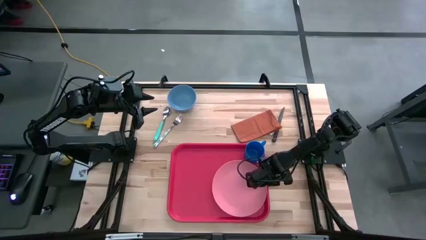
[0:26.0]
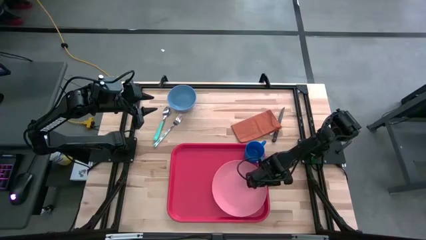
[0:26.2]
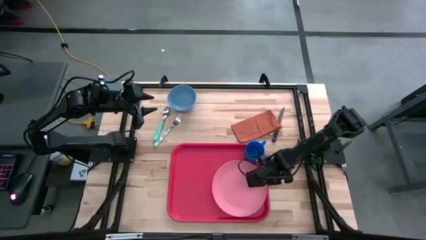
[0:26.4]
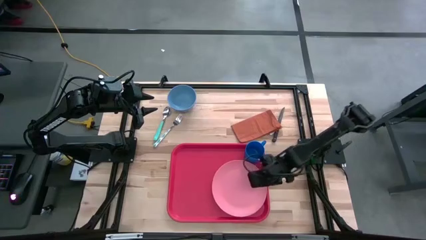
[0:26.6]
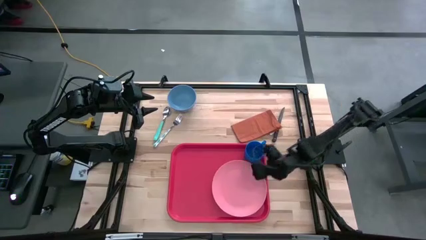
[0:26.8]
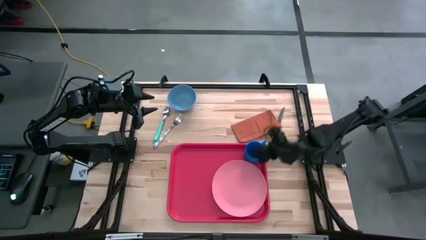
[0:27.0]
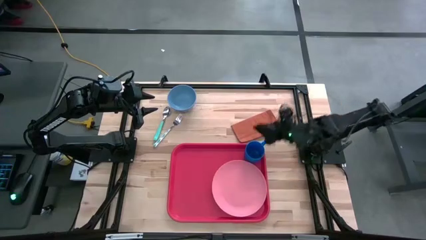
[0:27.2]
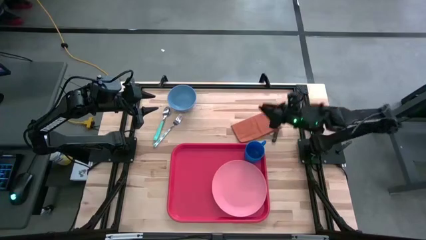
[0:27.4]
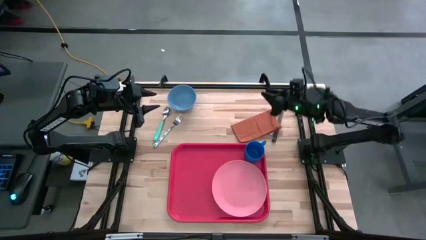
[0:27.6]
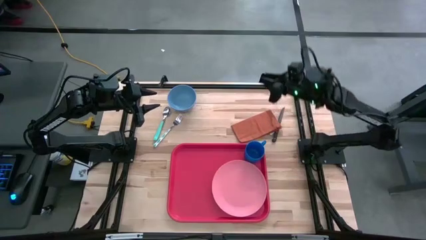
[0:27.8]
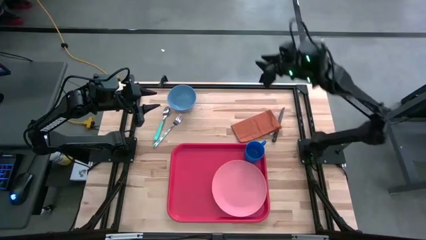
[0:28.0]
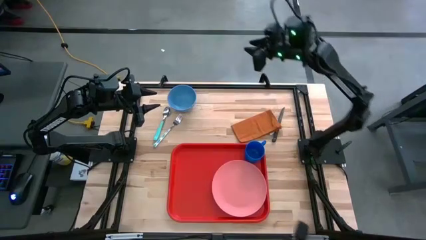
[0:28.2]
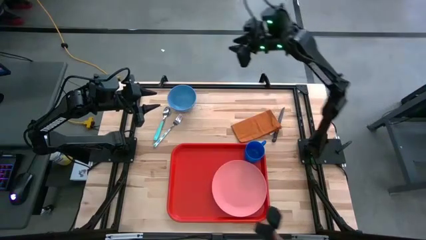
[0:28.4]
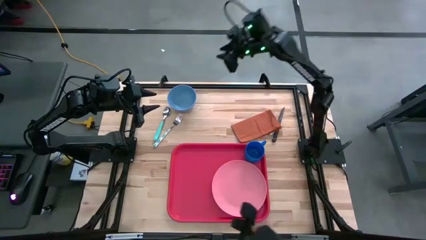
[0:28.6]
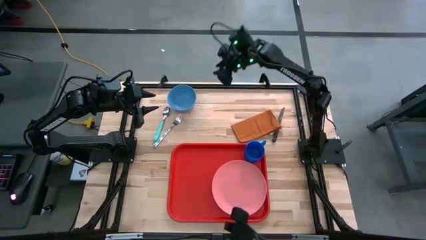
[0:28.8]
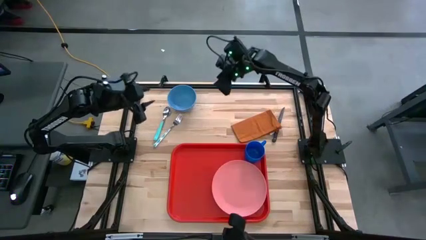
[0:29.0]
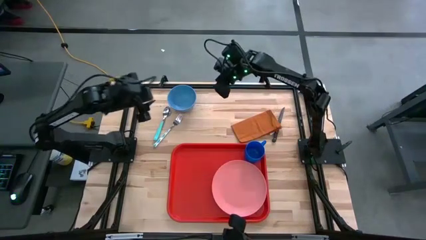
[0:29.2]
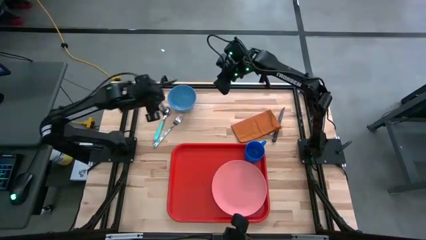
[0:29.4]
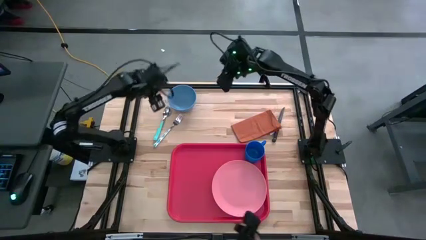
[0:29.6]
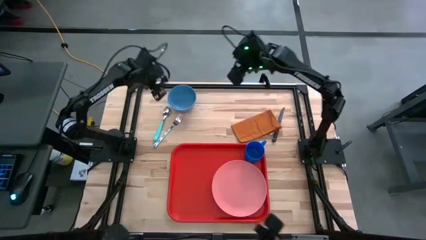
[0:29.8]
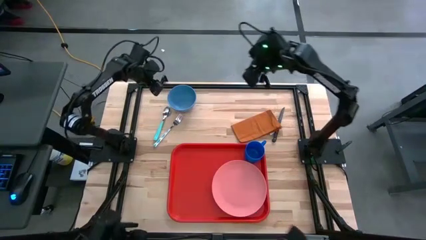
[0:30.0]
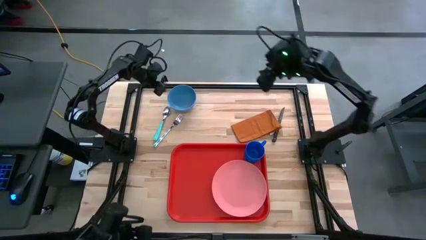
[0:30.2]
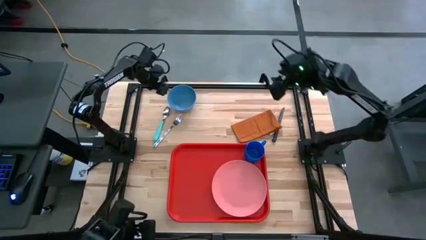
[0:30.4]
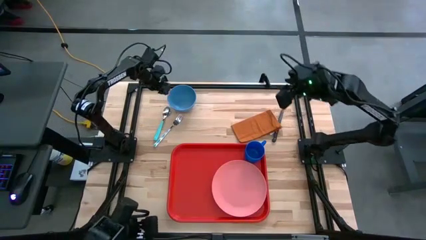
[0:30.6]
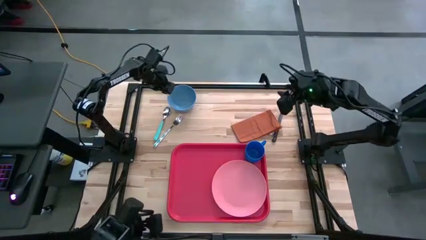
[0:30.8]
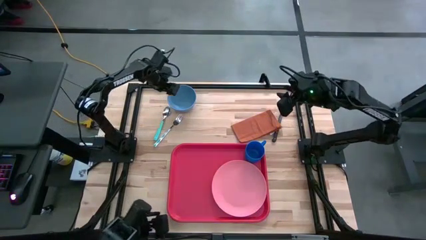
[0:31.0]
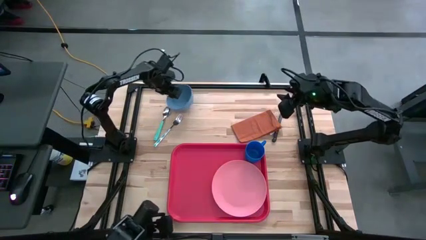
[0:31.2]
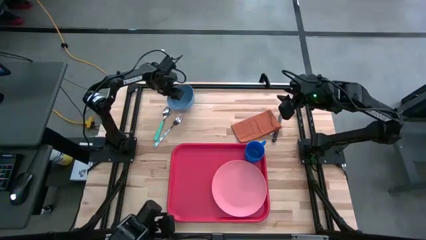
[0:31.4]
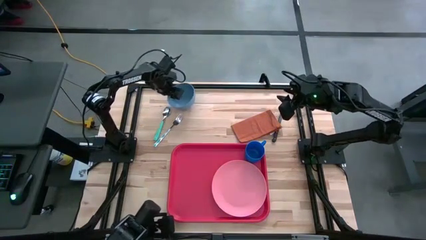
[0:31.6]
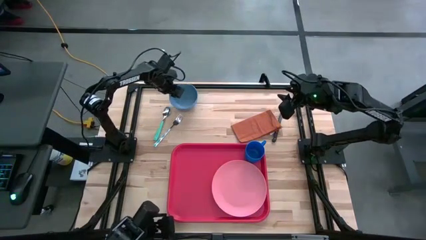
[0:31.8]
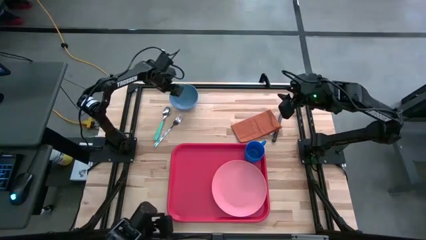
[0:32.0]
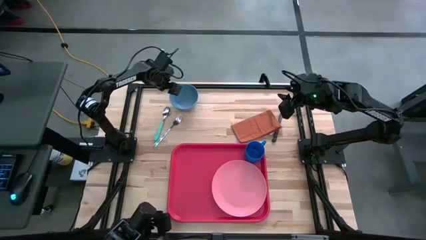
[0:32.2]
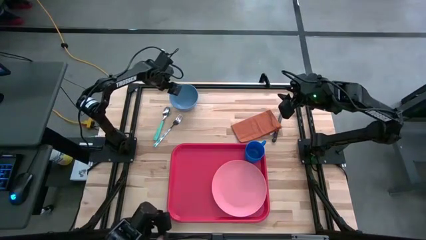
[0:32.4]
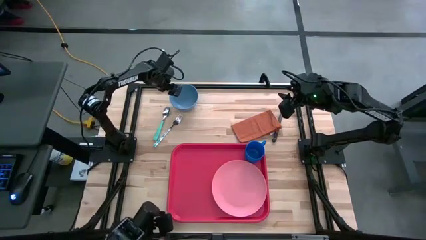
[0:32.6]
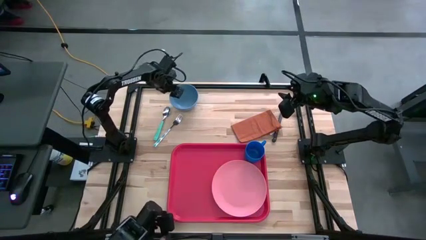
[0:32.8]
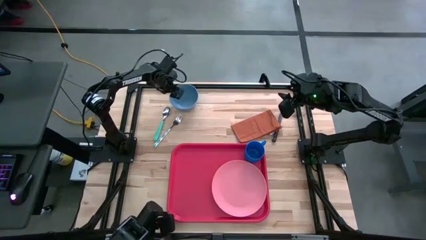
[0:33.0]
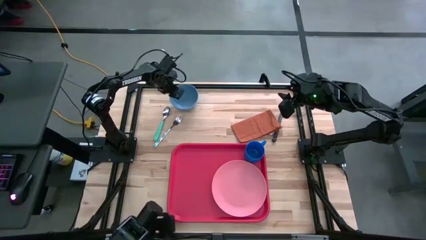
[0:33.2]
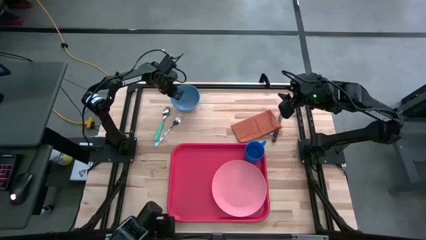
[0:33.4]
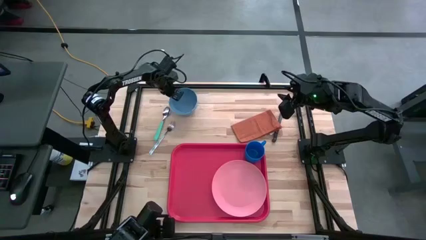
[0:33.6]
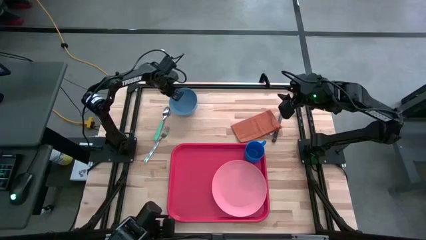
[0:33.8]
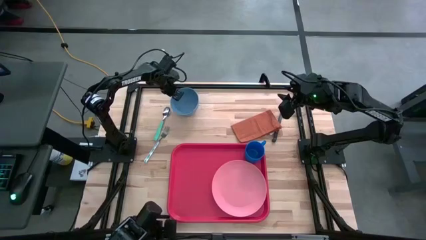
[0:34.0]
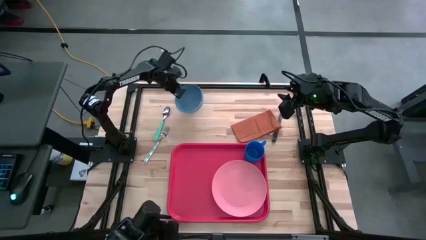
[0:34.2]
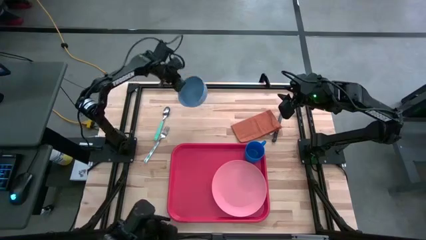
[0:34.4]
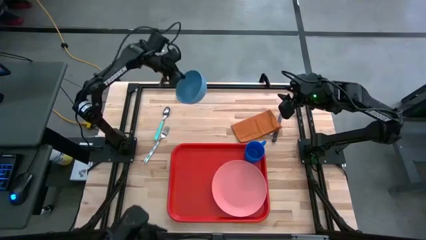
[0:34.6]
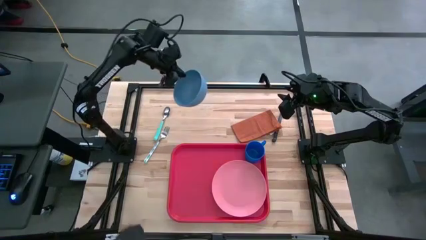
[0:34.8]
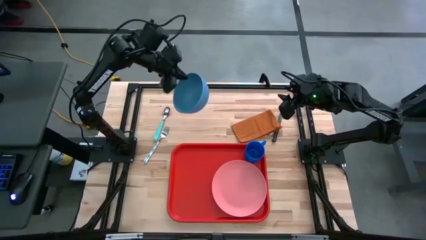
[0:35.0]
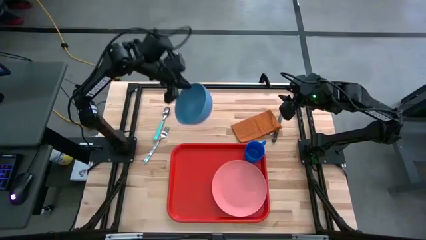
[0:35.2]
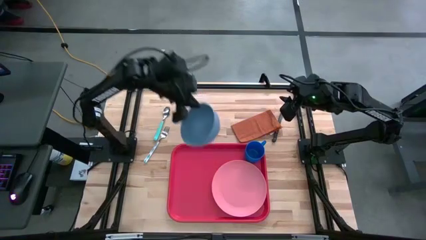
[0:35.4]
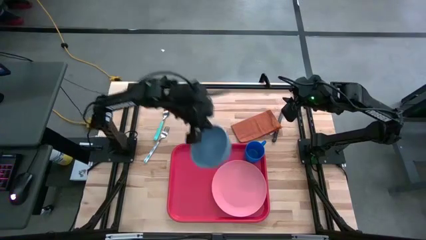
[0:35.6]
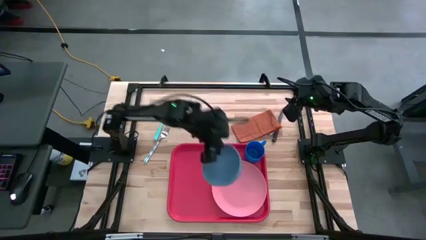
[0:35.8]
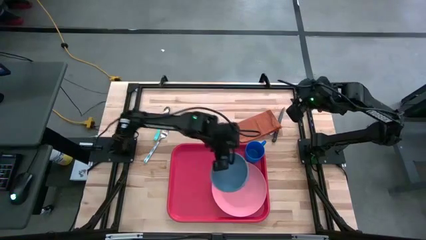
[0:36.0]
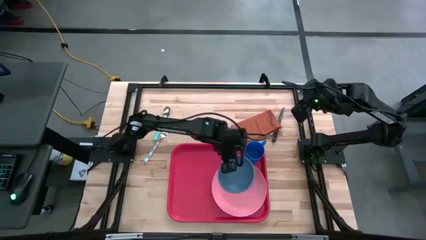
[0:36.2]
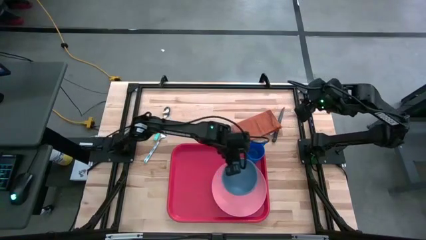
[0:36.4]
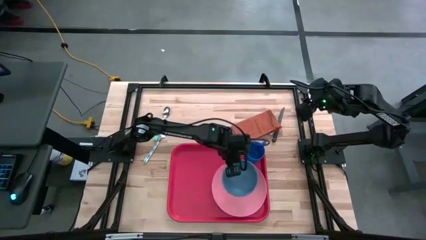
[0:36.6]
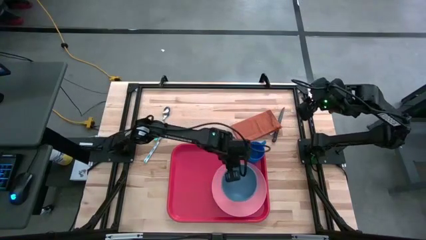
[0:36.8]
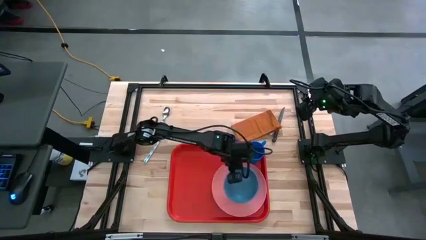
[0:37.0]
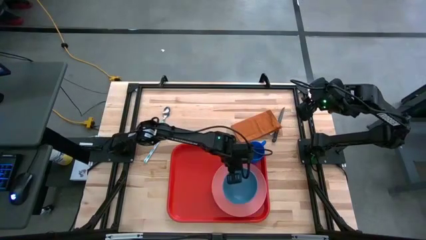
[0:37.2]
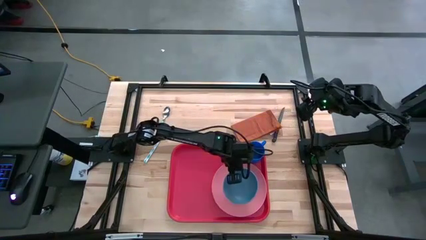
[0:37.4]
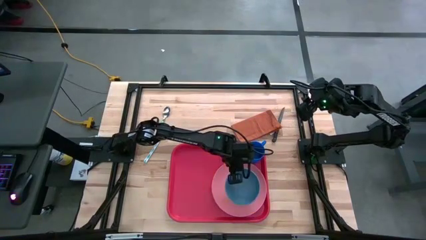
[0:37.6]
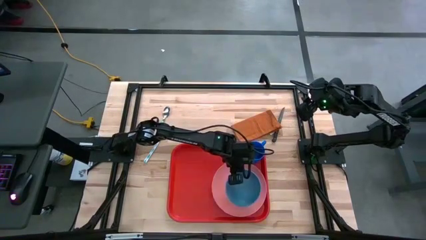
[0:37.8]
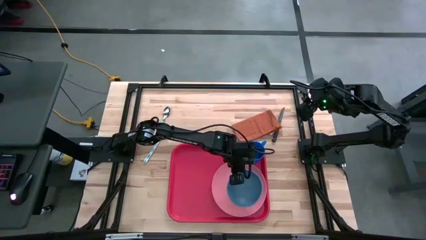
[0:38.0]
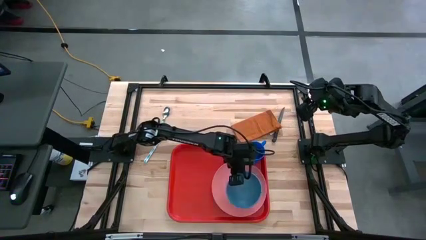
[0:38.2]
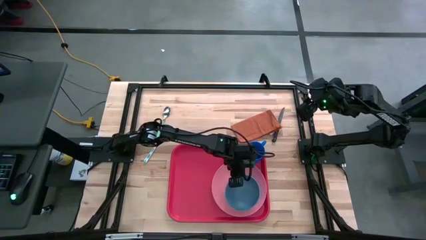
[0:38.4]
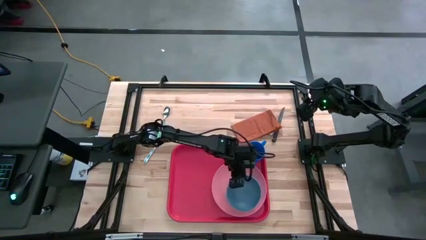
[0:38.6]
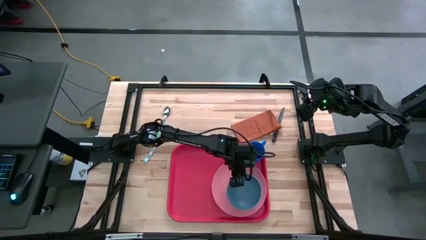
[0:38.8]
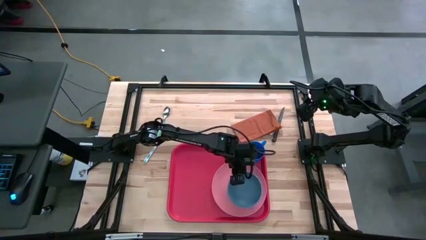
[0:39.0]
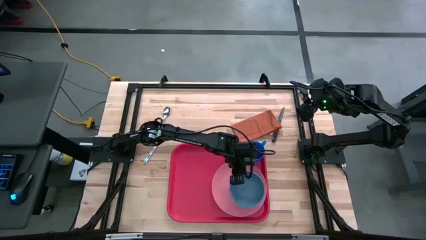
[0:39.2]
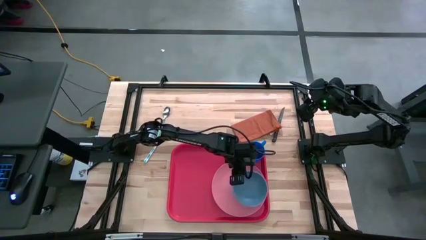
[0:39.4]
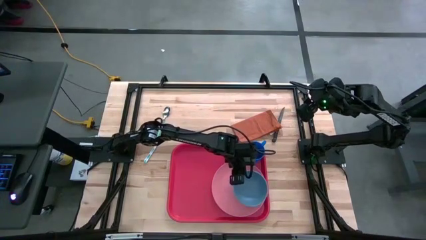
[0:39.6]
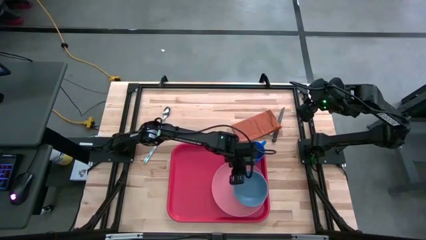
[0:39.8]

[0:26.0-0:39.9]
Task: Set up tray
Put the light blue bowl on the pink plate
